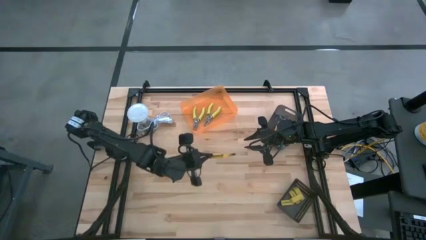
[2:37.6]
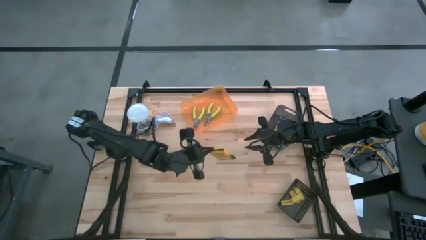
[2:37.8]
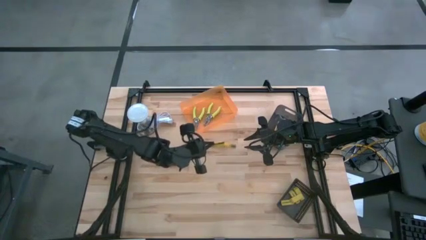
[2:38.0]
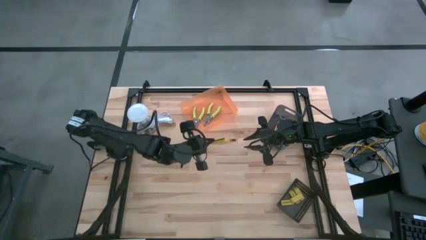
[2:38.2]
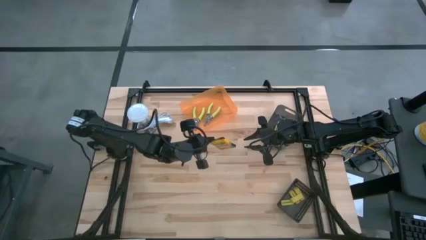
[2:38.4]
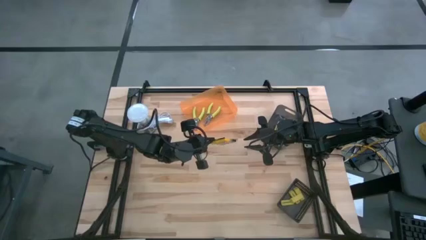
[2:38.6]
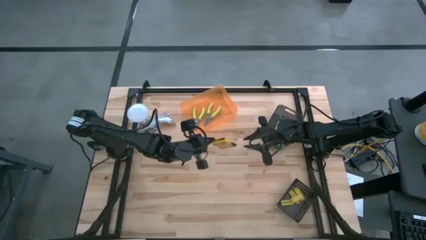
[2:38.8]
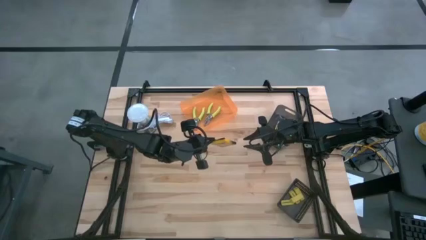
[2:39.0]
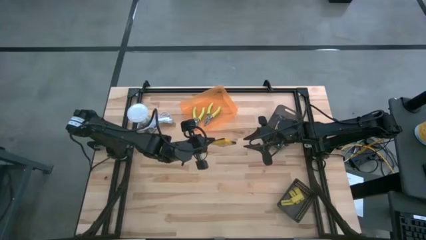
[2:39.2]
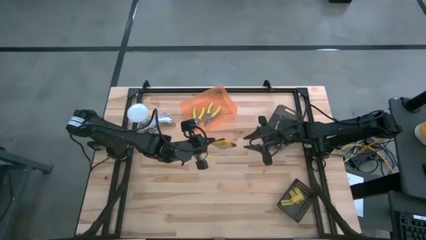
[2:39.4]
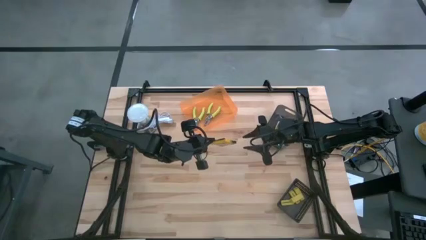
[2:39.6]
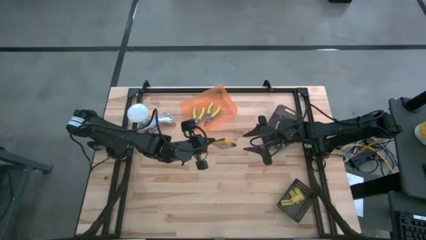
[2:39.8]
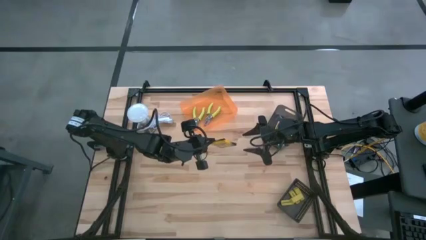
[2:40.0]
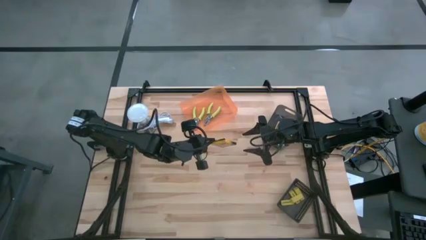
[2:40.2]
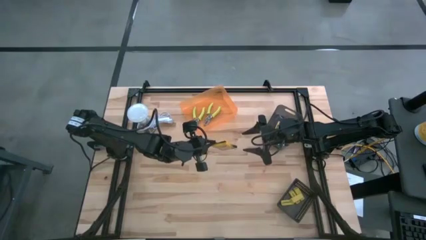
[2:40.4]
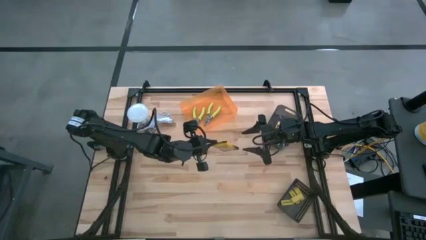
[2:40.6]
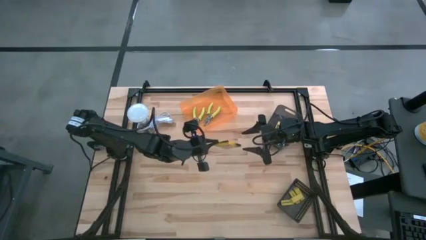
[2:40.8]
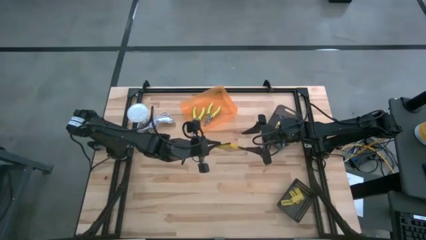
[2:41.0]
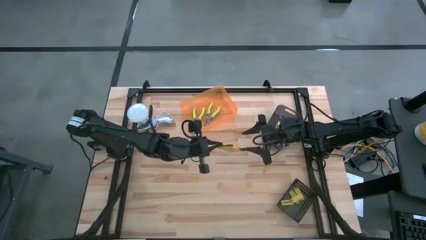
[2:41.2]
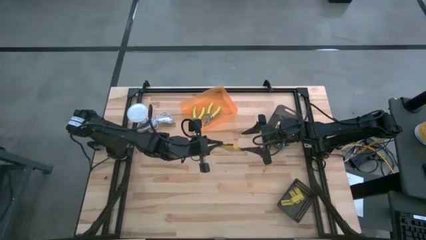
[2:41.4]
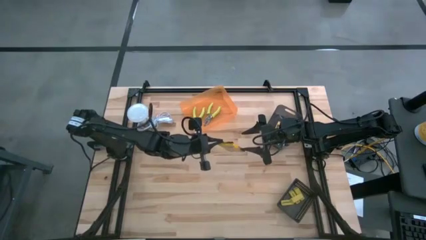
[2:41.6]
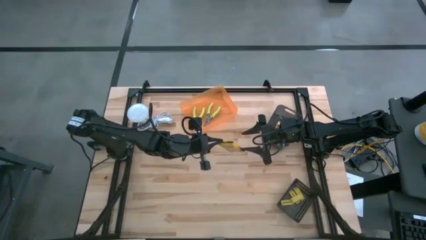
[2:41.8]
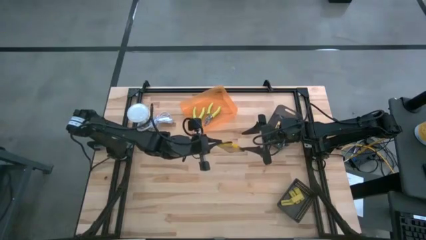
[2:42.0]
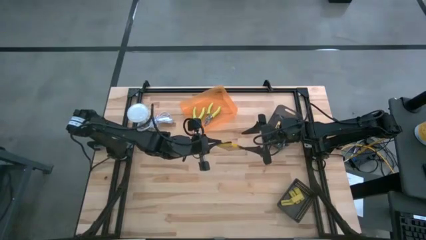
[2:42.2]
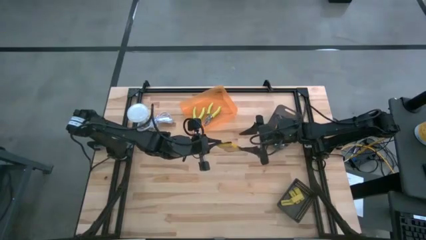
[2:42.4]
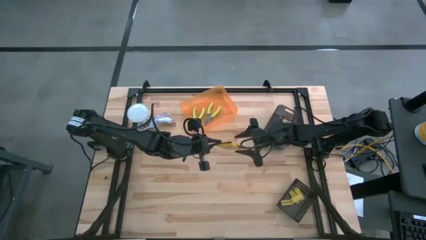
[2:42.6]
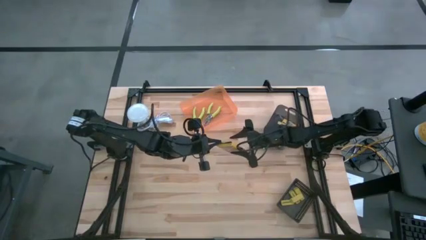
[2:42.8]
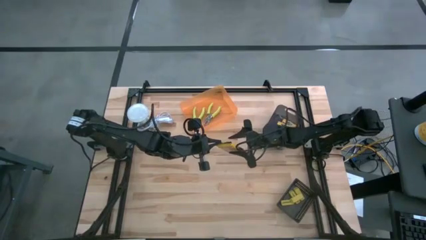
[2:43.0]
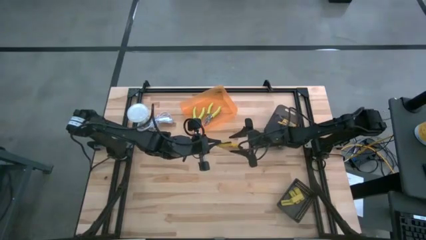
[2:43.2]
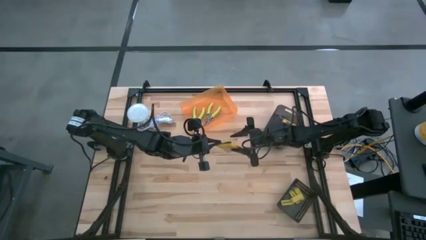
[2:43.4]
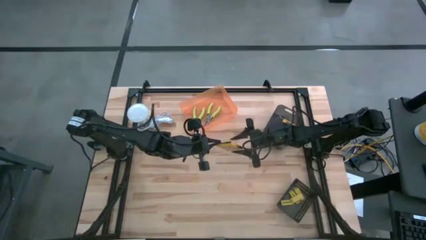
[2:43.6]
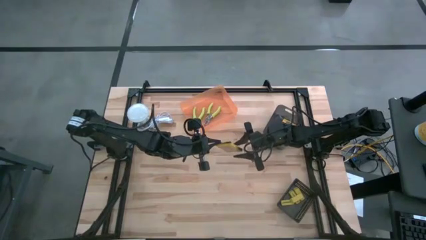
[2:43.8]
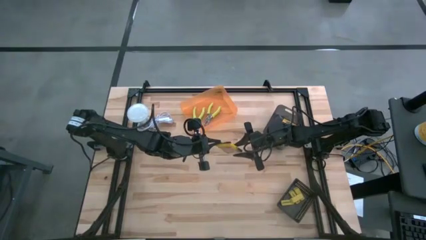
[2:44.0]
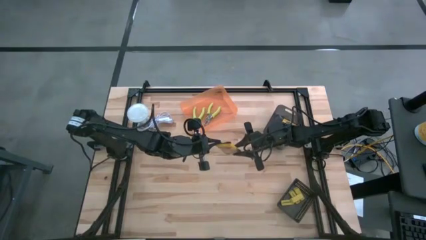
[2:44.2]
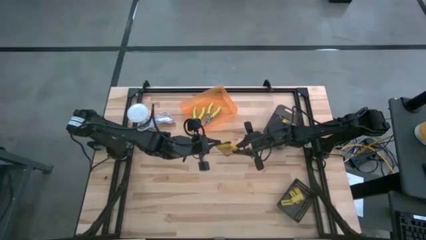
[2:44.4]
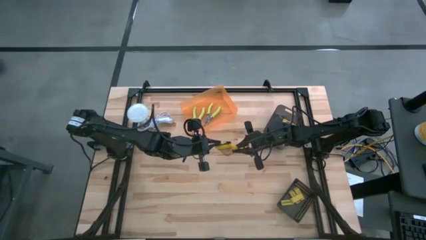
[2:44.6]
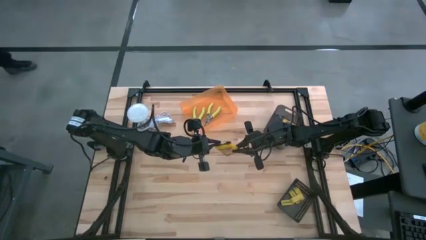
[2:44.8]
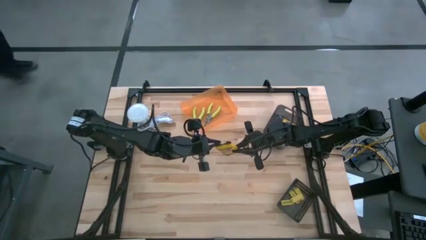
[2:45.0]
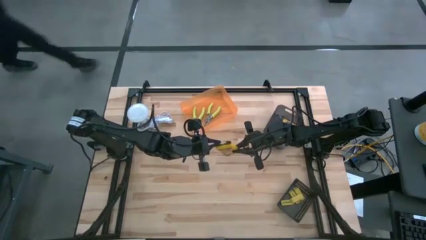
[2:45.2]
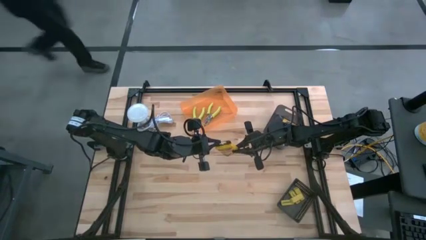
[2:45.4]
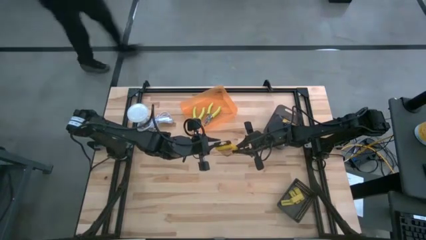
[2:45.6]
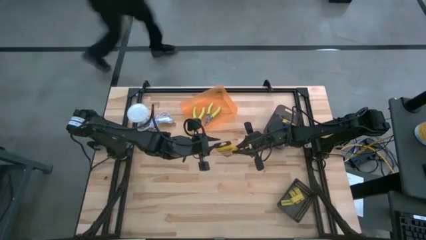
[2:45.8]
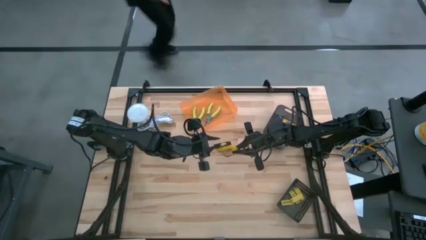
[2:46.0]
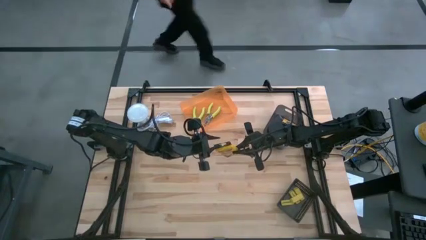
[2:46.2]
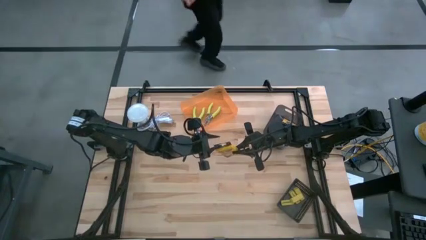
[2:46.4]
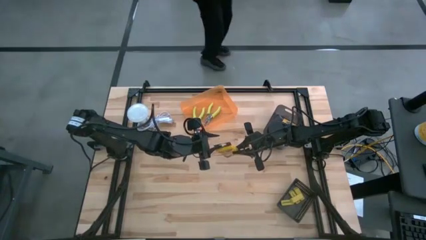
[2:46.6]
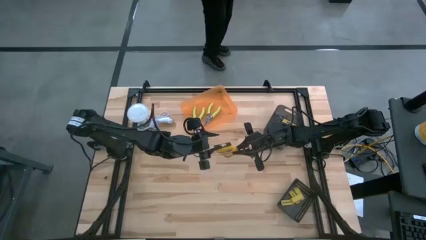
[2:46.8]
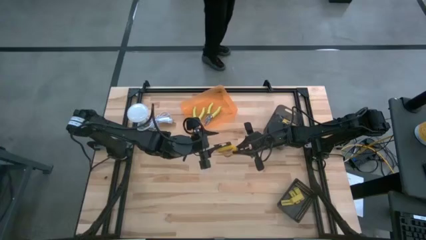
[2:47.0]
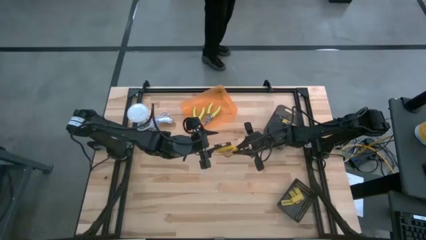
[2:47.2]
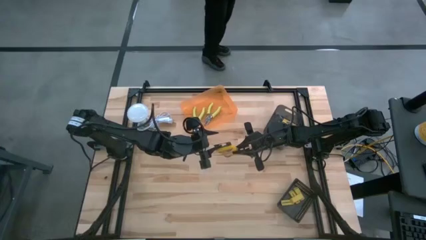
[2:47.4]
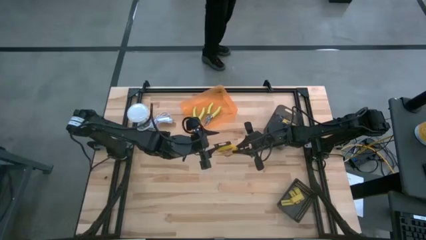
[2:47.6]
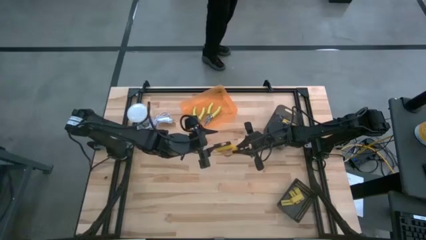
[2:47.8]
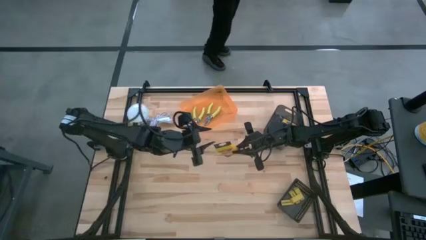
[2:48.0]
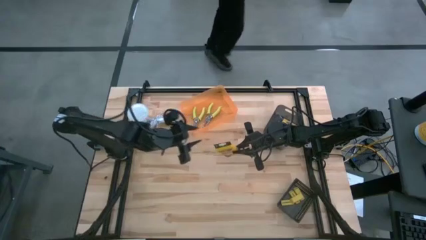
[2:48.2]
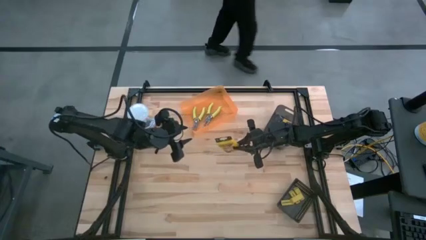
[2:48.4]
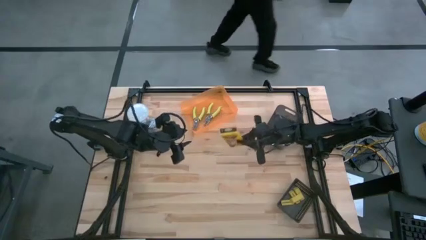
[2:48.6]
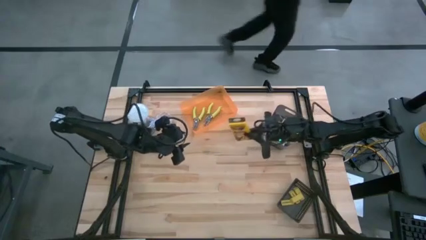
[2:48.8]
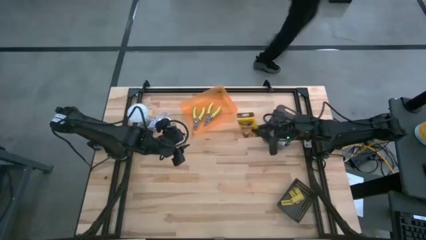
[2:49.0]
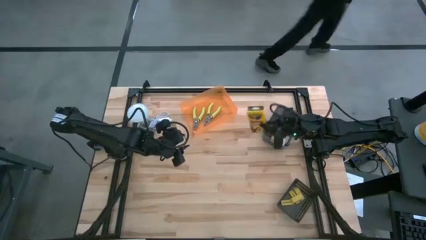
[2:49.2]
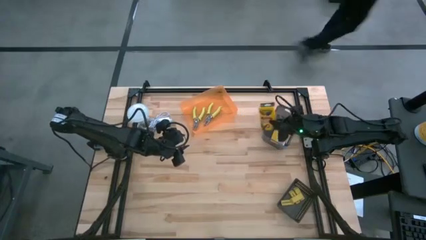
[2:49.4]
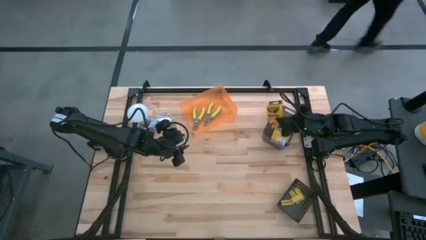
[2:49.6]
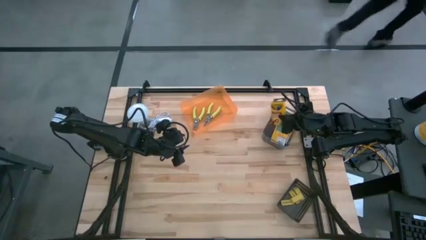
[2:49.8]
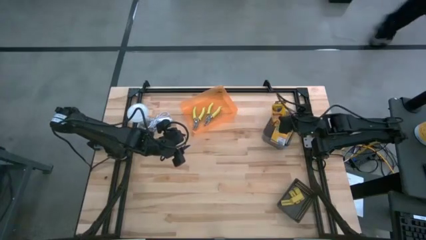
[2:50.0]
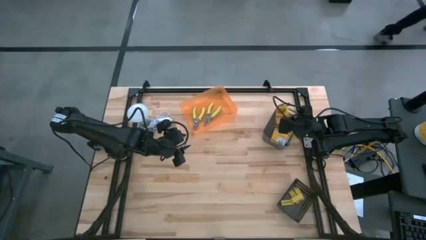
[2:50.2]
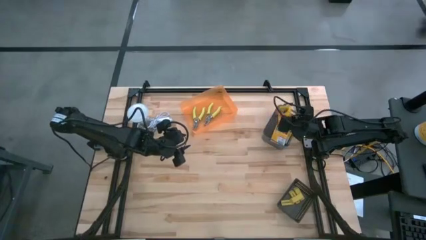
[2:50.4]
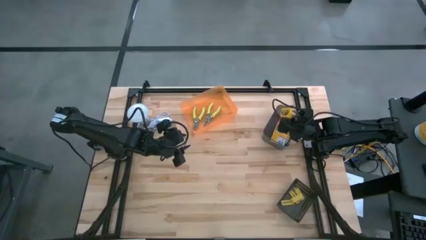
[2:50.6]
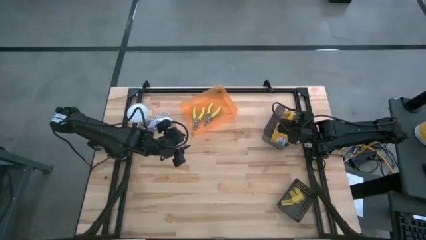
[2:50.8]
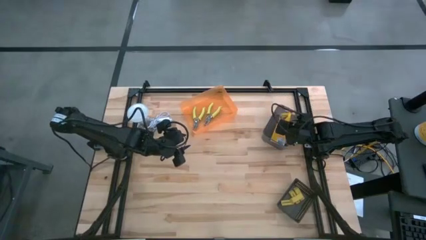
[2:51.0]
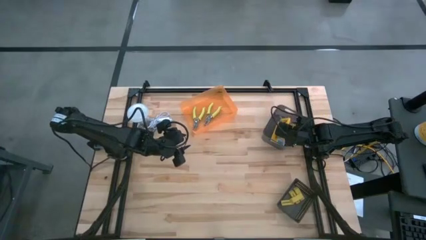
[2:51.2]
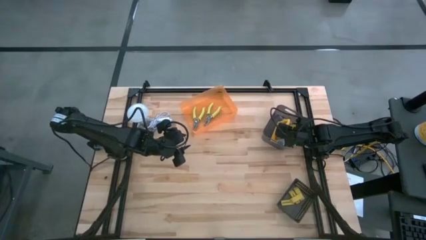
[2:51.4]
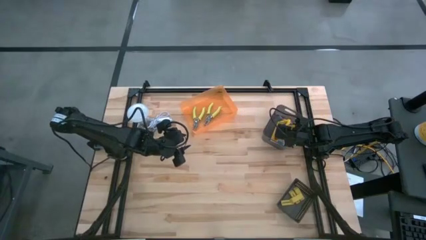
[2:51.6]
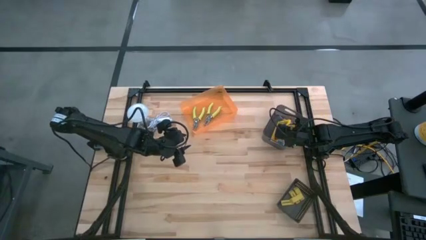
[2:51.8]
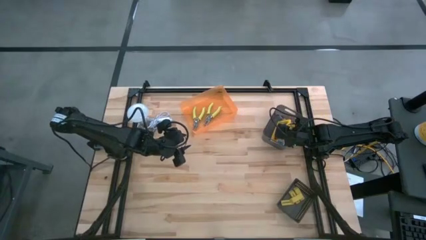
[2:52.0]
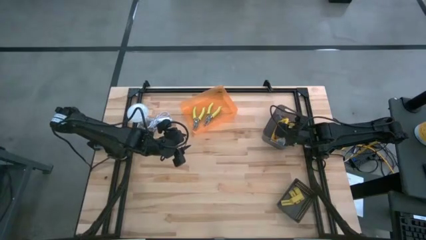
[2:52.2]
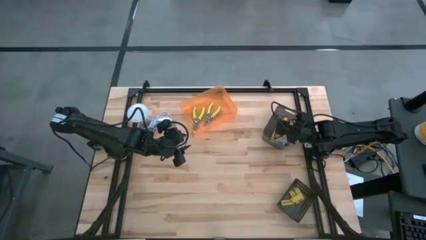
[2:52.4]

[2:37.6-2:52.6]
Task: Pick & Place School Supplies
Put the crayon box into the light black bin

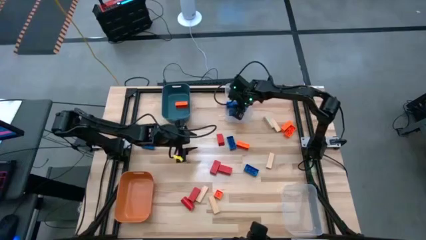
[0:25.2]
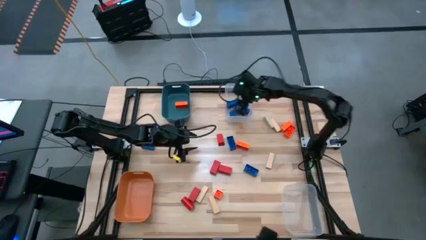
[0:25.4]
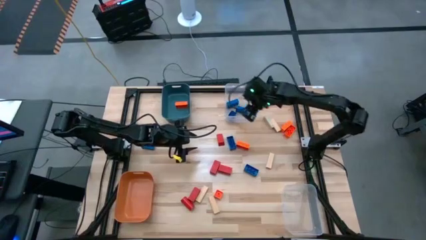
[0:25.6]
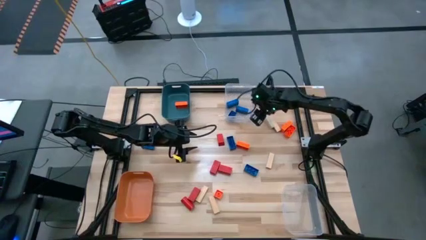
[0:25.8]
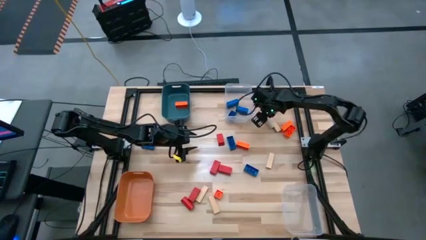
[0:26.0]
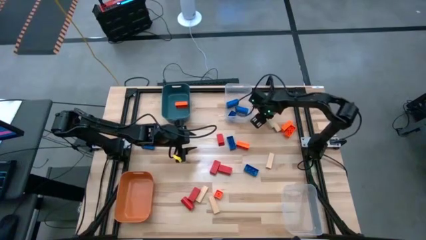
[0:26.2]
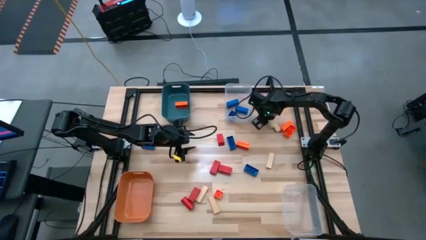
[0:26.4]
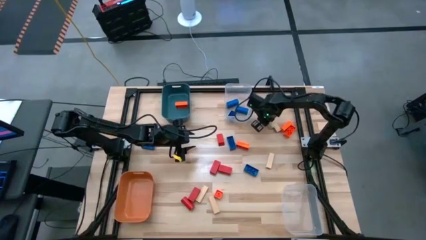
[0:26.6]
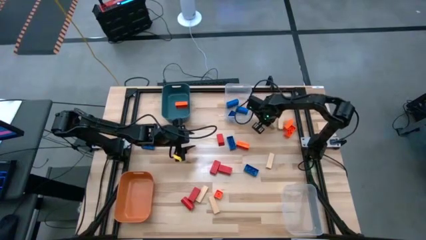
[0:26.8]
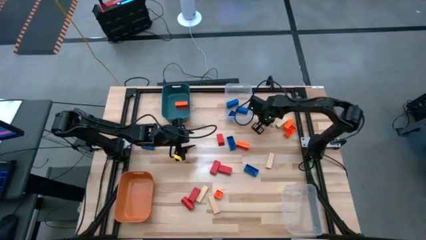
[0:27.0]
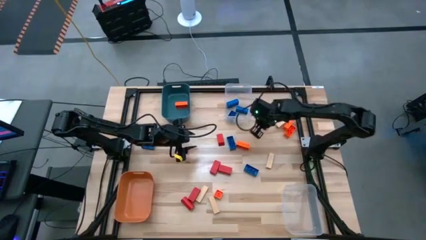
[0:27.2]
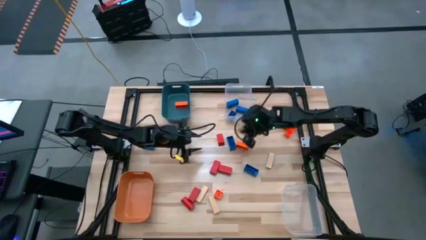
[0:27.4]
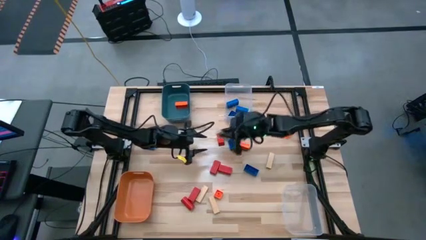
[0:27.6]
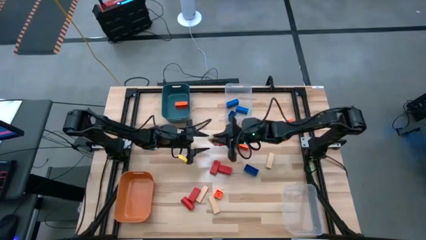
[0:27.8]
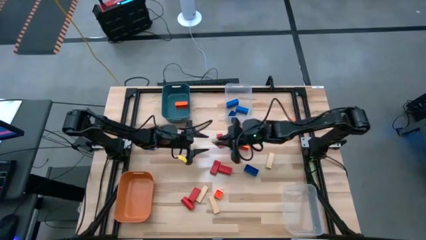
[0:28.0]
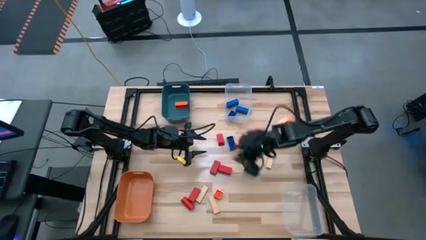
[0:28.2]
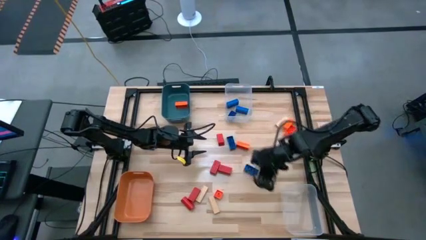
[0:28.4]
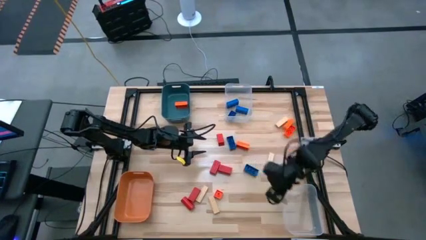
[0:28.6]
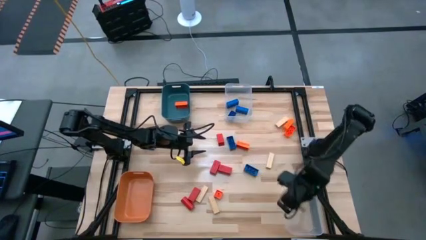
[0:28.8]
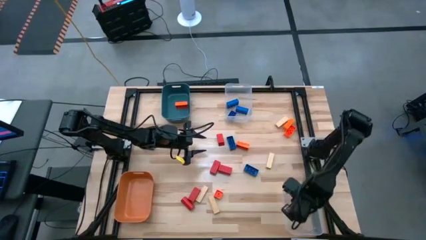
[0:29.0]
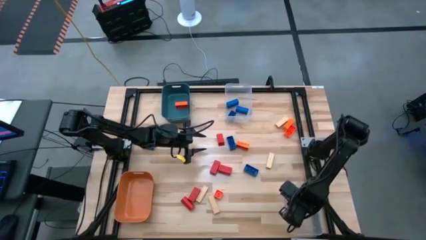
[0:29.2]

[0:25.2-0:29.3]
Task: Sort blocks
Put the brown block into the bottom transparent bin
